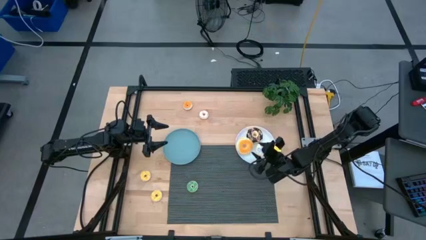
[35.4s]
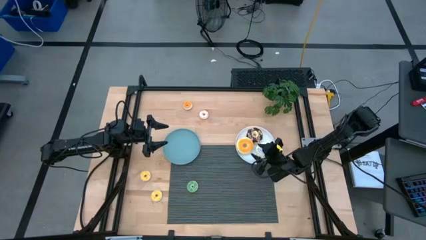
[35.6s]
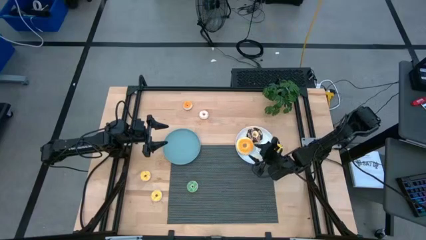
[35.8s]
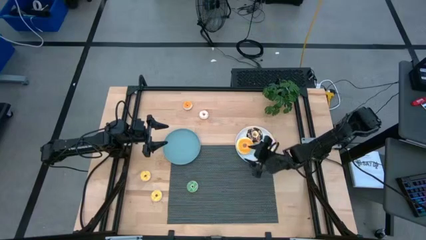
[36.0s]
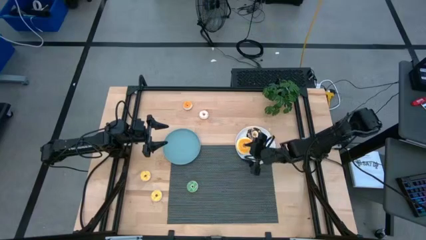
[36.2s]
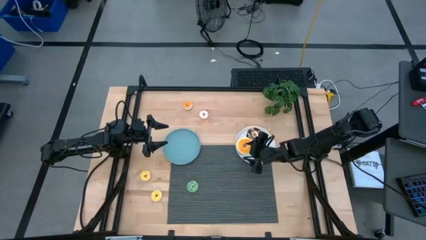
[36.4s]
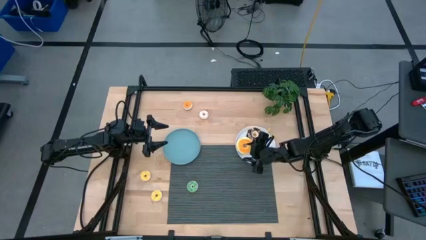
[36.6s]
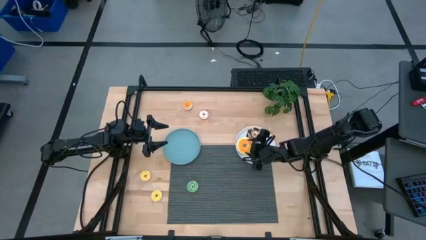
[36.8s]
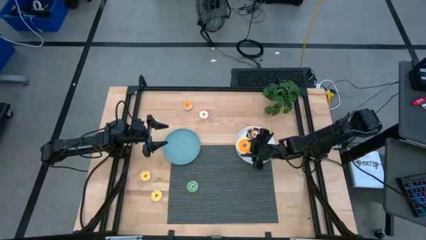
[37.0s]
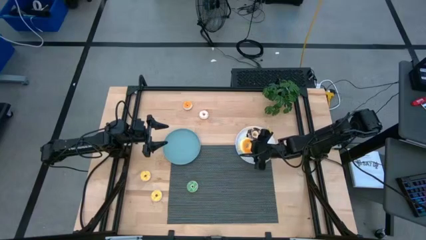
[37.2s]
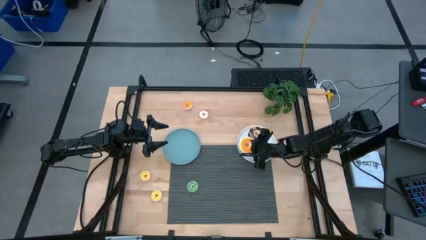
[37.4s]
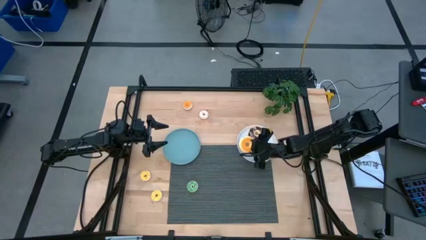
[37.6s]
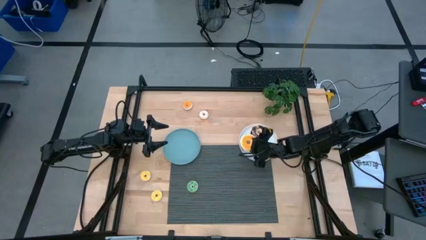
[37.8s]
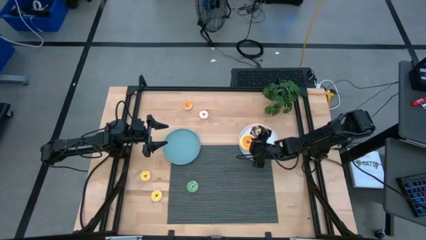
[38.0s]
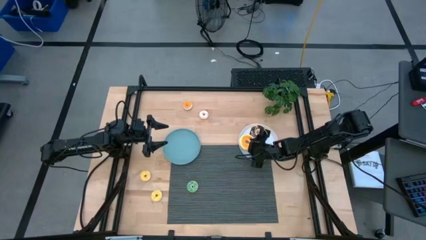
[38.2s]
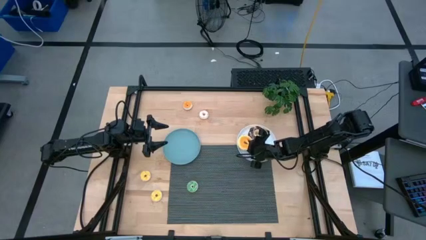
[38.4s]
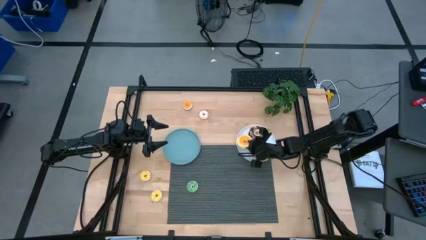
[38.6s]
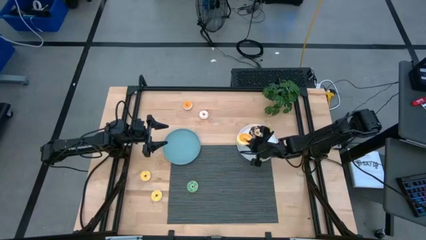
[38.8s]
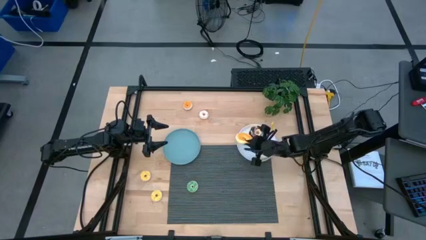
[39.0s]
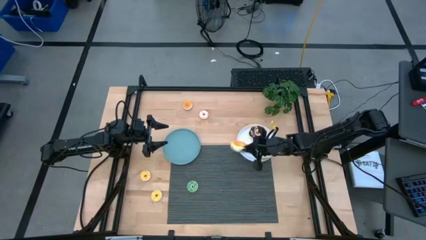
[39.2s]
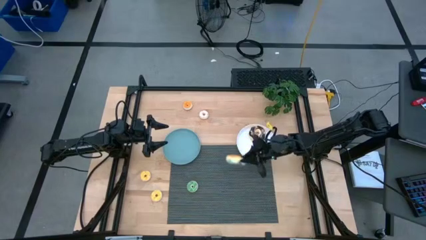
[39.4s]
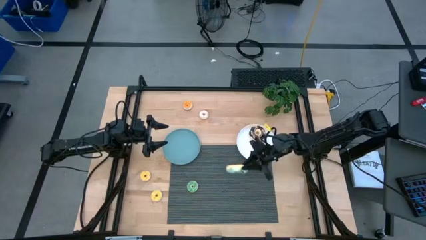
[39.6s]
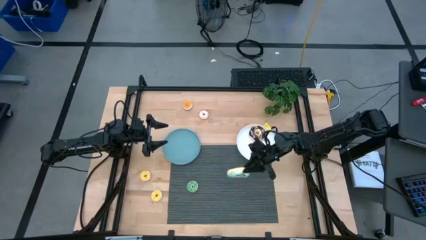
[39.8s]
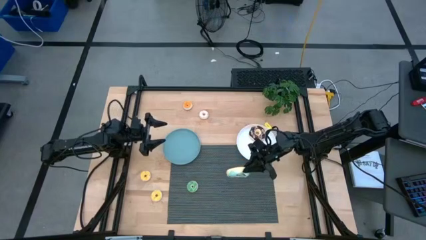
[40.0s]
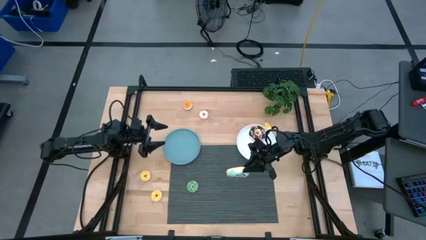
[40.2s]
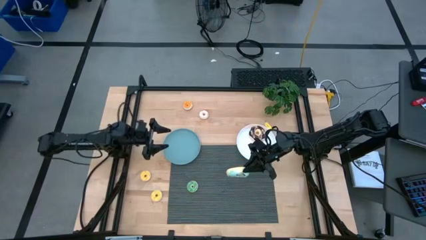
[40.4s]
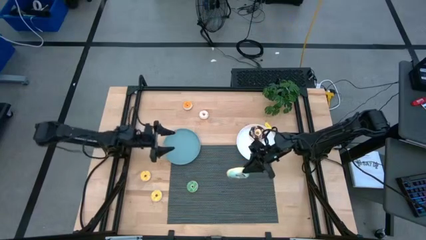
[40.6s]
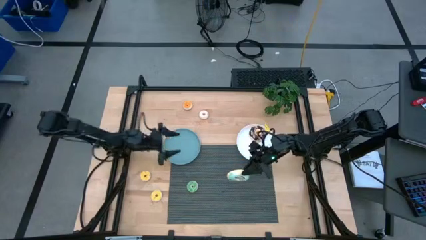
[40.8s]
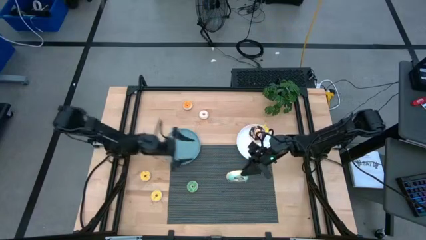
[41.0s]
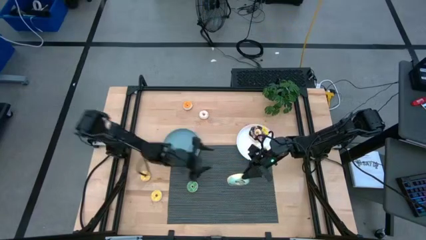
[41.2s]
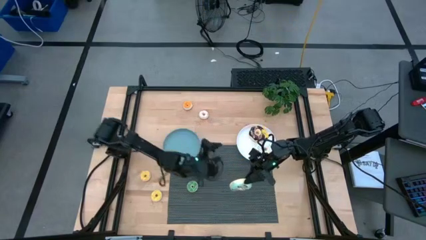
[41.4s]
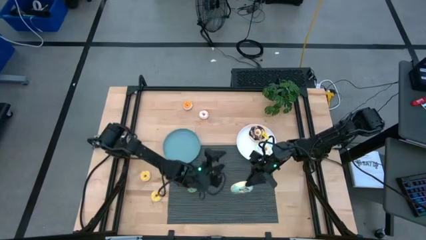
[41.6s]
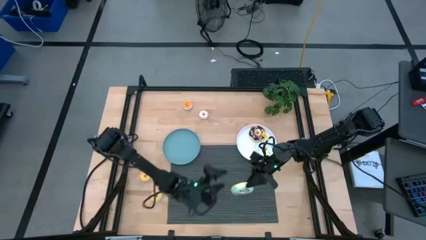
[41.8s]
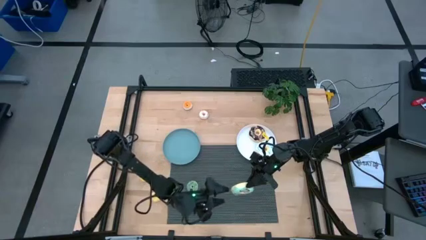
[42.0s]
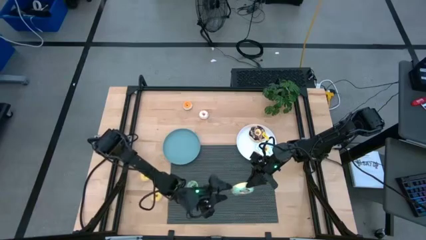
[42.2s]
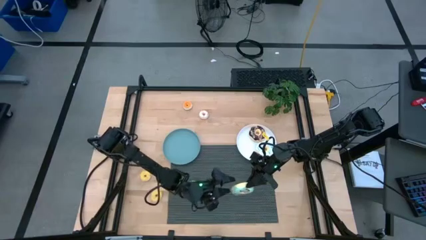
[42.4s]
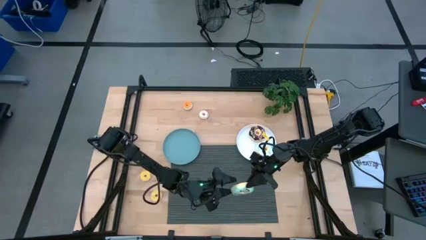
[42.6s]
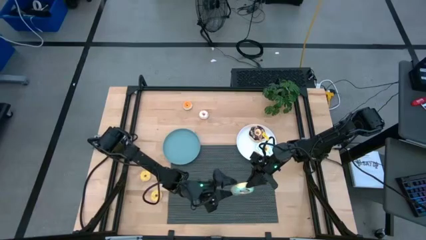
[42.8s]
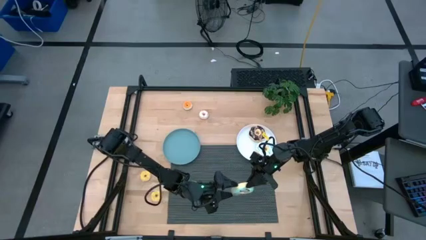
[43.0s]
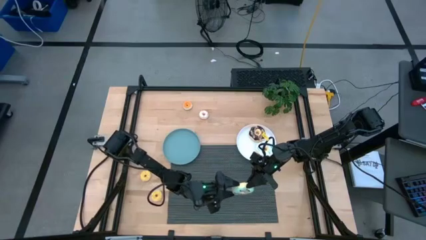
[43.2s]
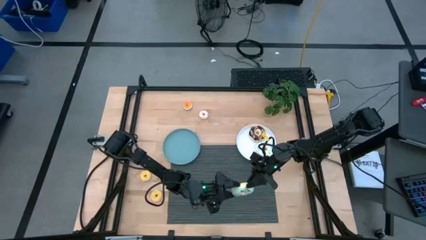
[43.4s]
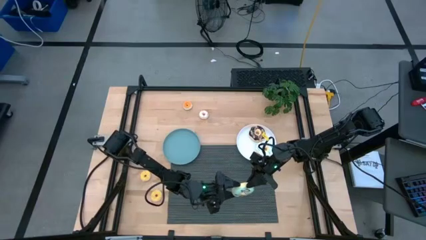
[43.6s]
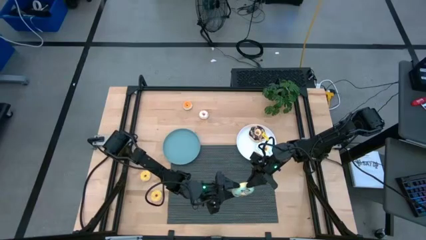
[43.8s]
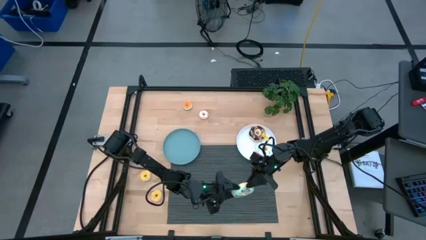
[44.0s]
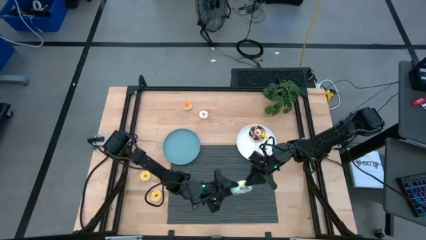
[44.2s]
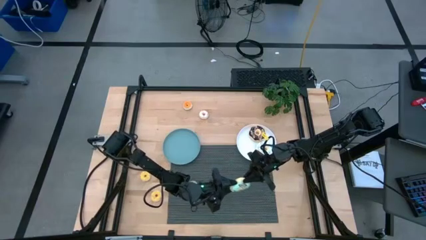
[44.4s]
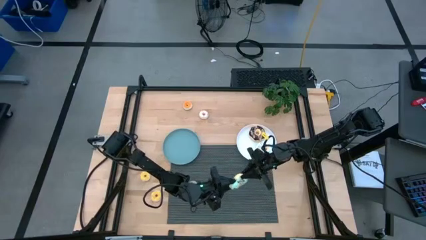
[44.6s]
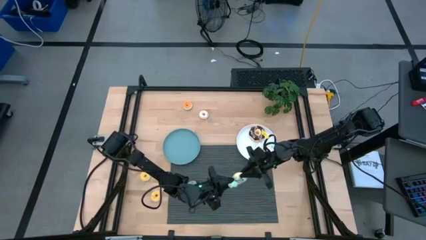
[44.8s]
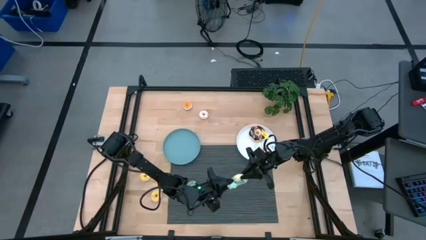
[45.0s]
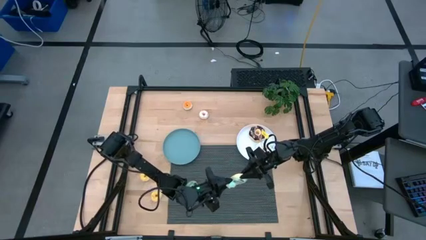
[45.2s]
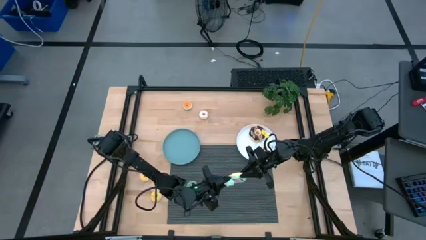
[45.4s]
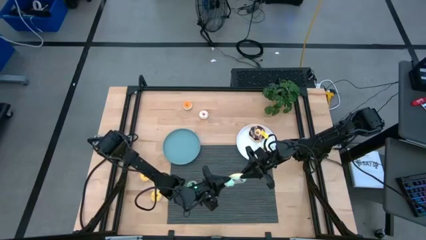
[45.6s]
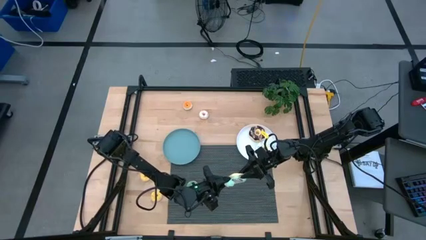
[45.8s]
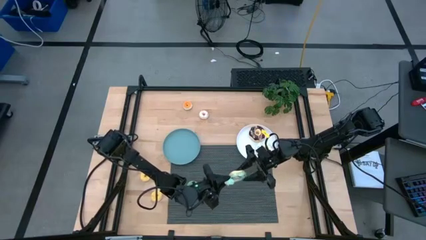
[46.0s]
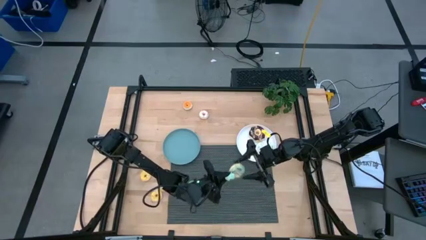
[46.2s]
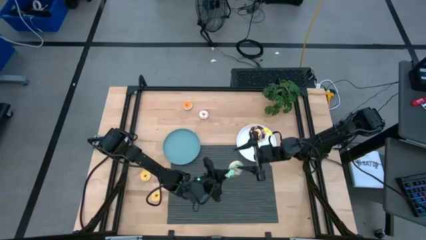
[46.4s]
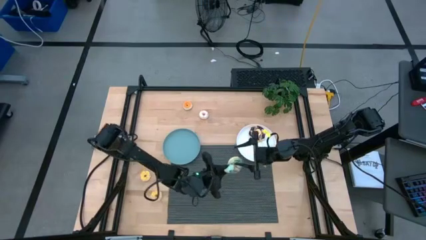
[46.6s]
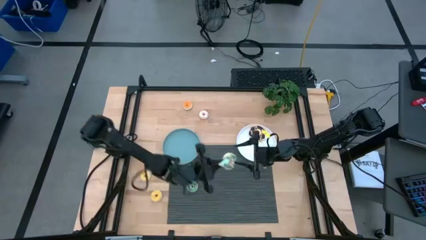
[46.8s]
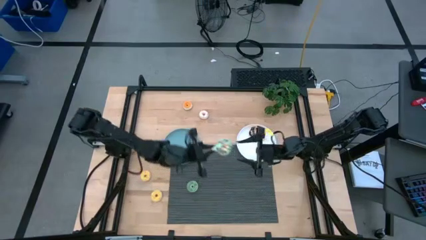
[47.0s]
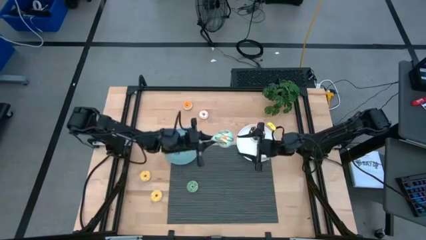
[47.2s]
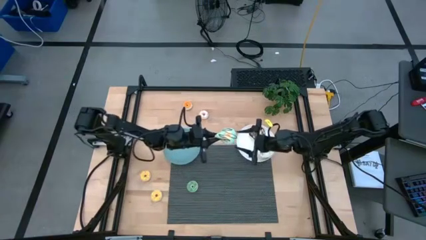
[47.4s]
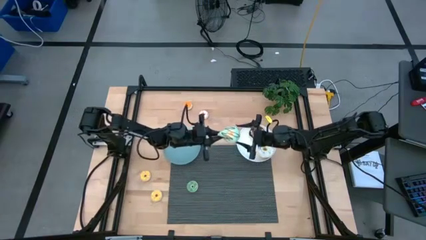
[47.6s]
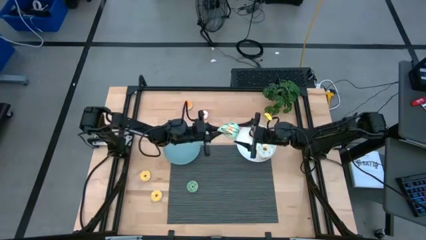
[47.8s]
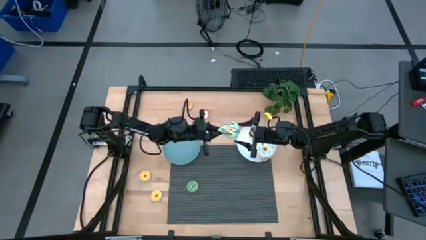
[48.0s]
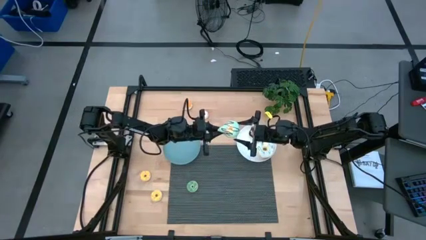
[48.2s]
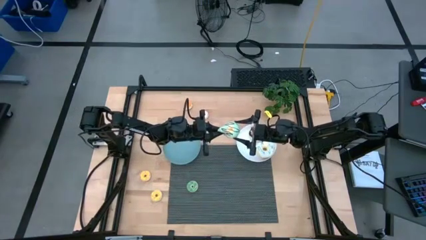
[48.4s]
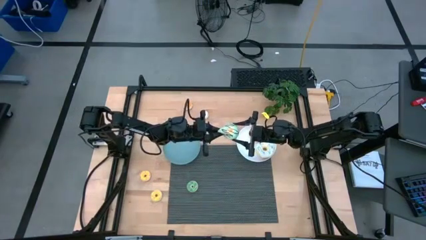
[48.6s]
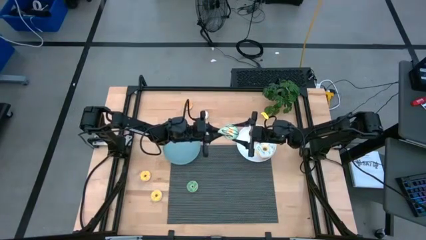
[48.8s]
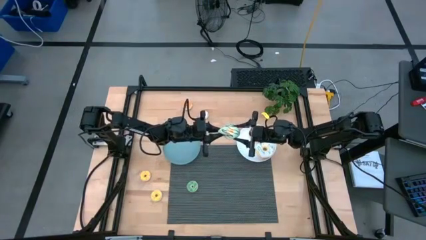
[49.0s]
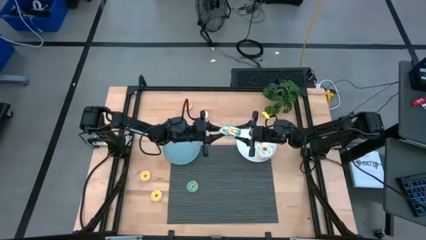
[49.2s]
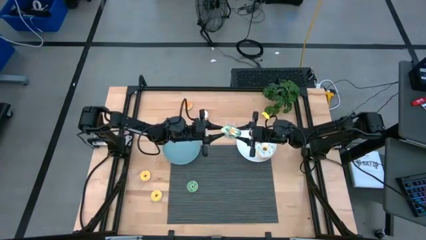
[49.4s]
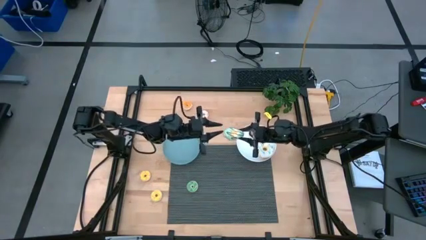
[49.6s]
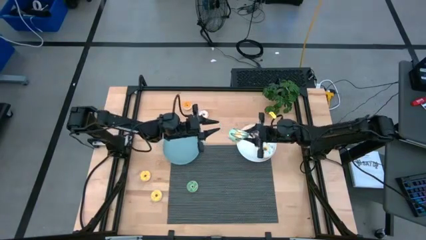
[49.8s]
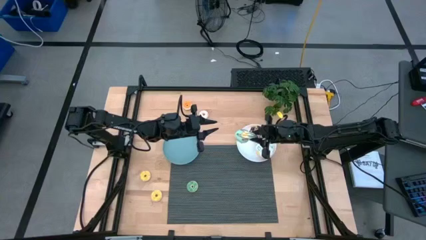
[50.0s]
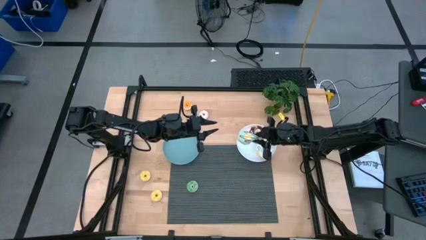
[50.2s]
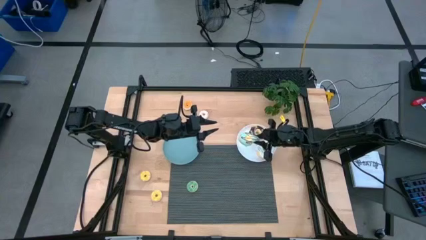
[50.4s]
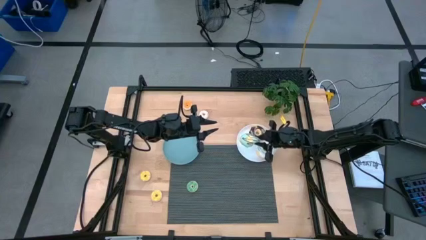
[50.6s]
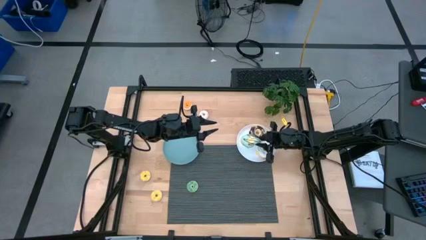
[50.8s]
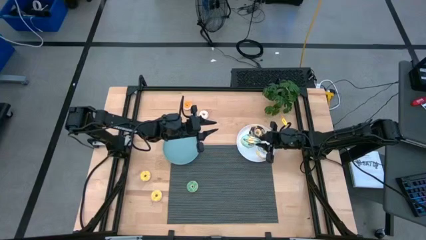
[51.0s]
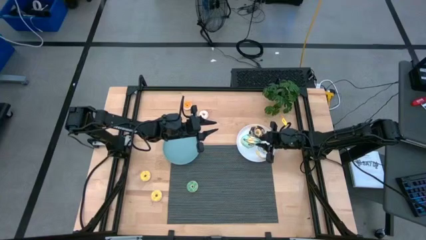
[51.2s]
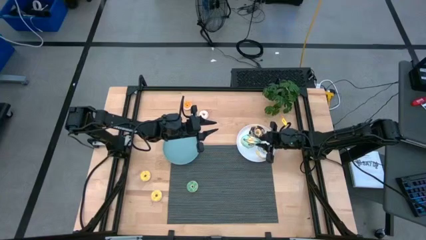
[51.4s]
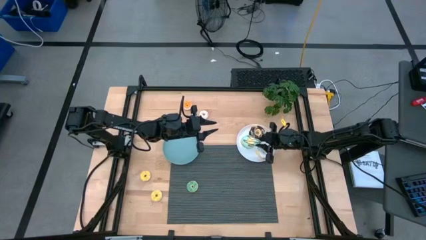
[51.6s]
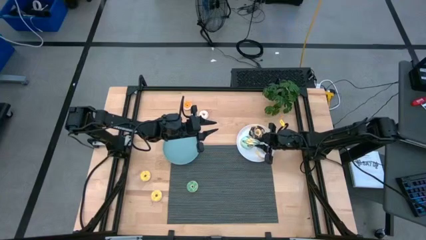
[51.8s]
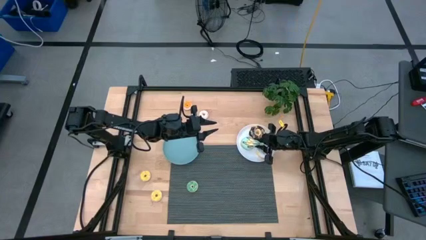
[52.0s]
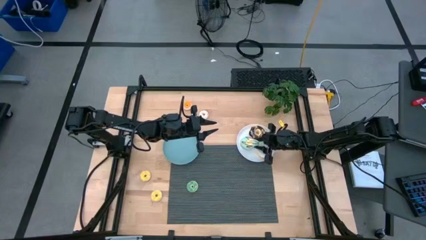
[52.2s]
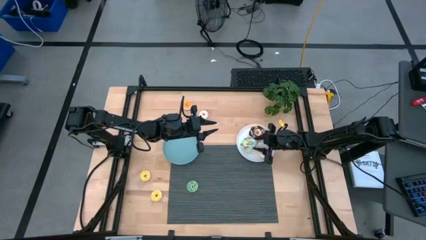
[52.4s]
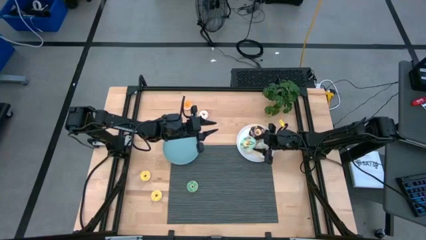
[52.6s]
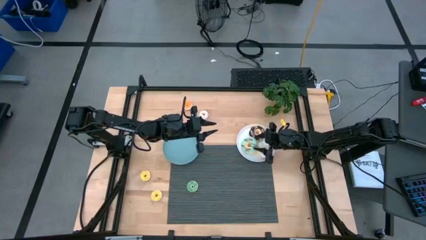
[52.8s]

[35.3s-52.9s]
Task: Pick & Place donuts
Put the large blue donut on the white plate
